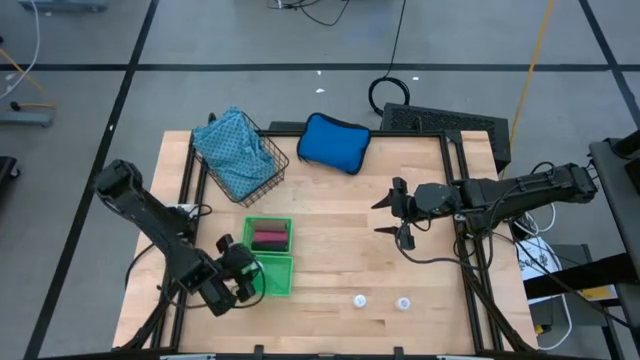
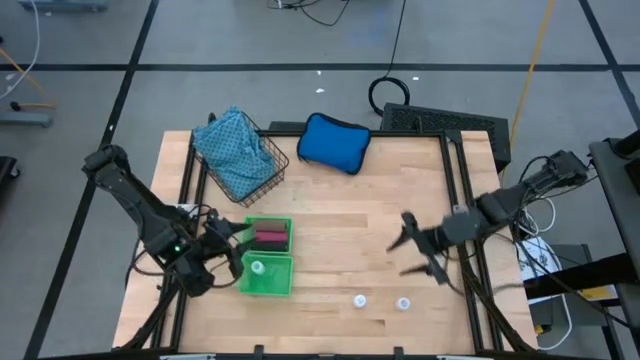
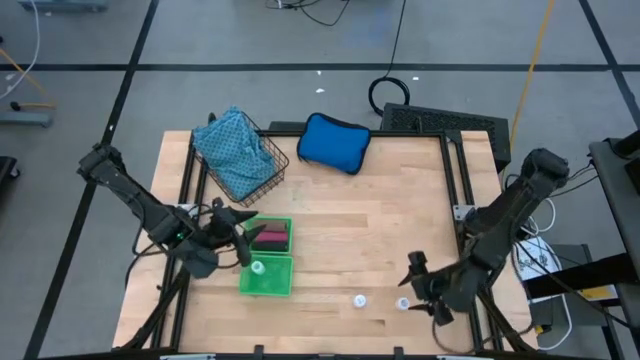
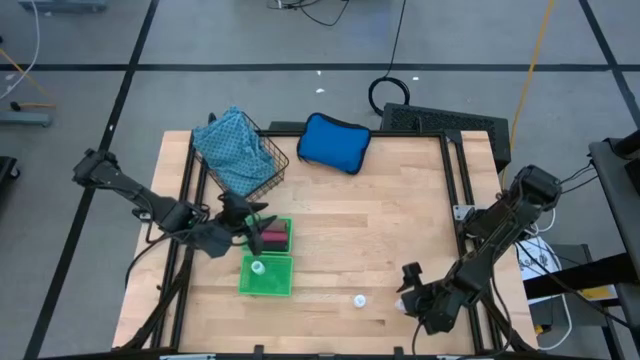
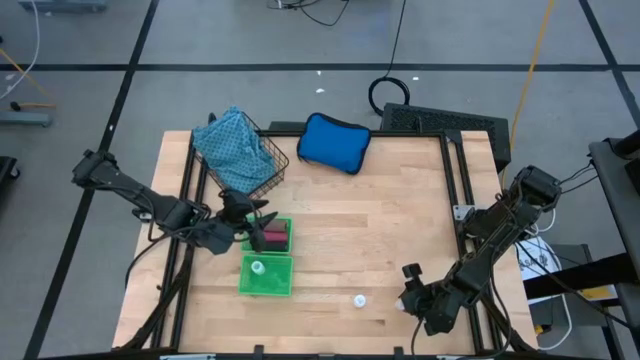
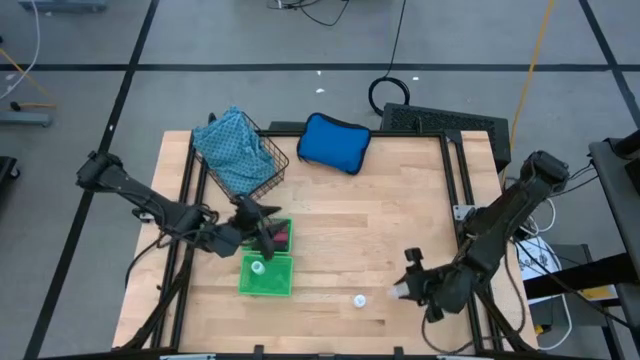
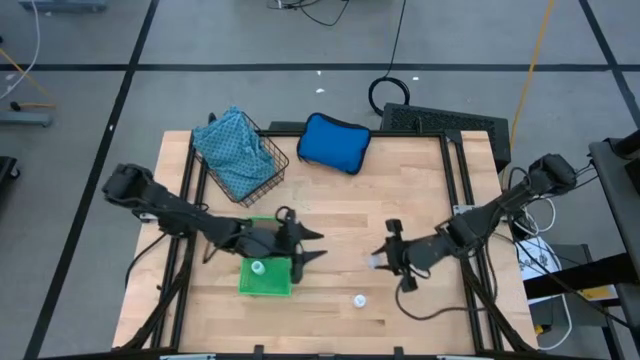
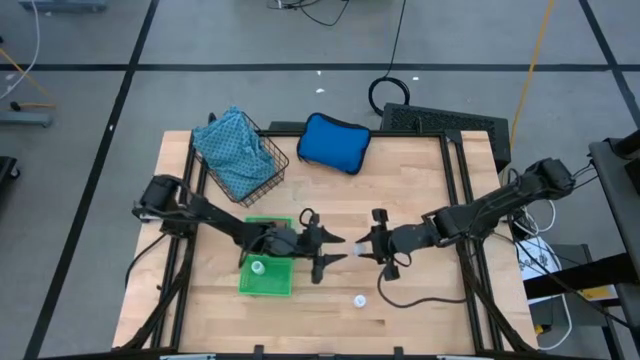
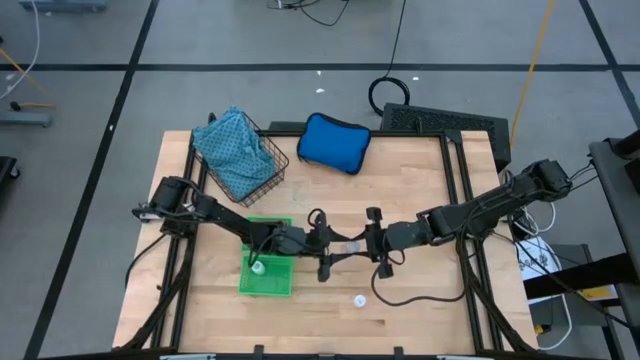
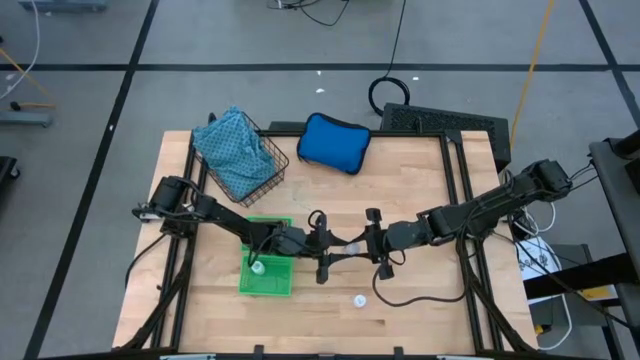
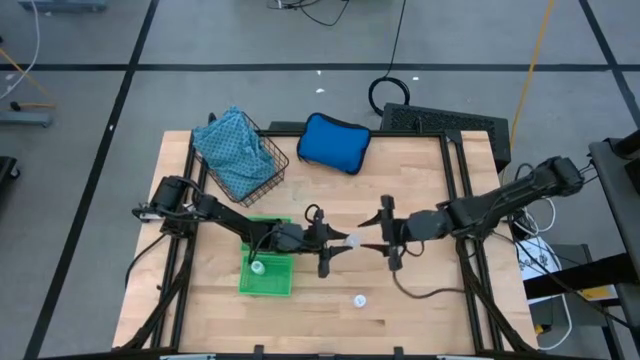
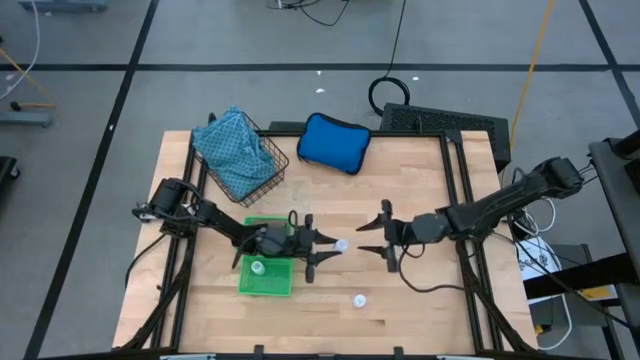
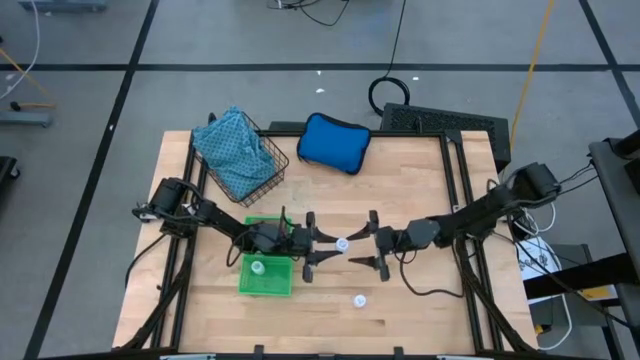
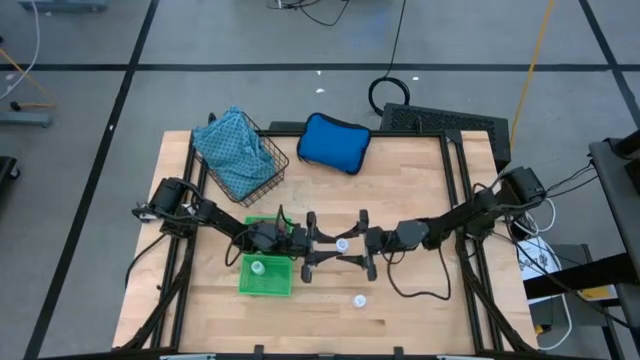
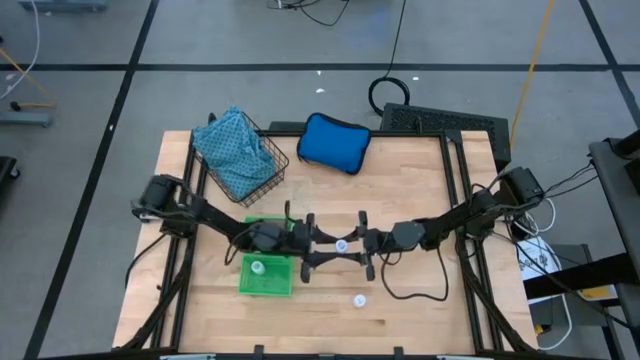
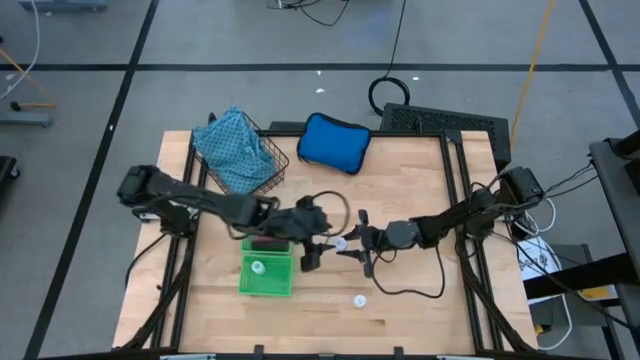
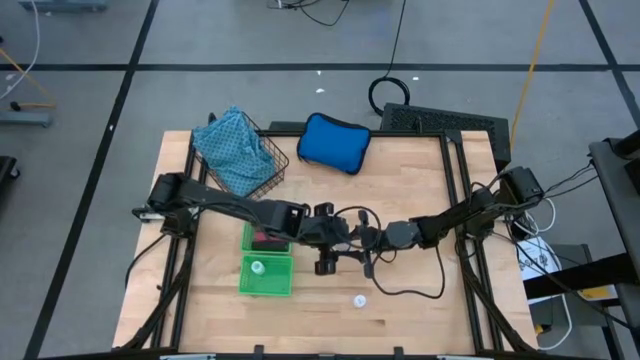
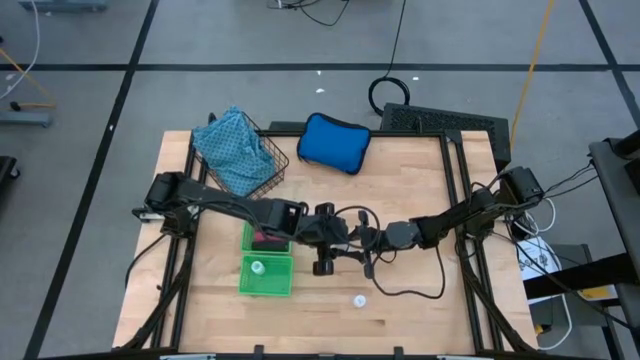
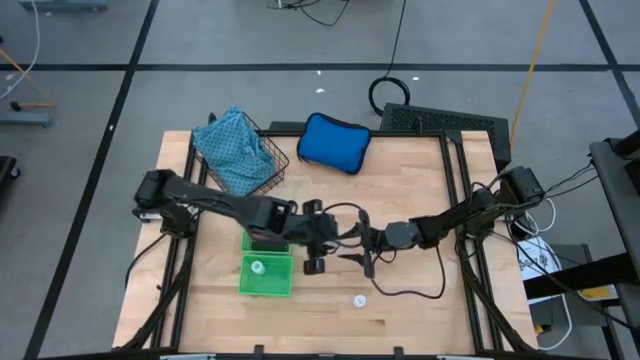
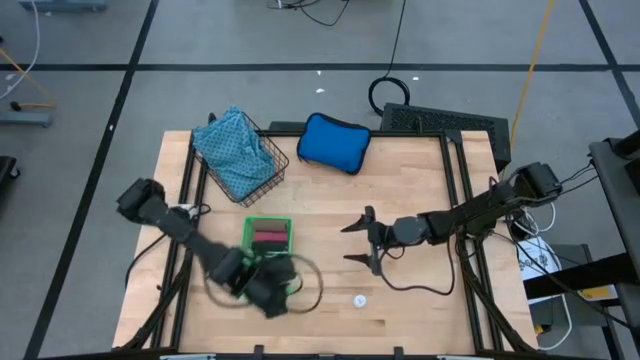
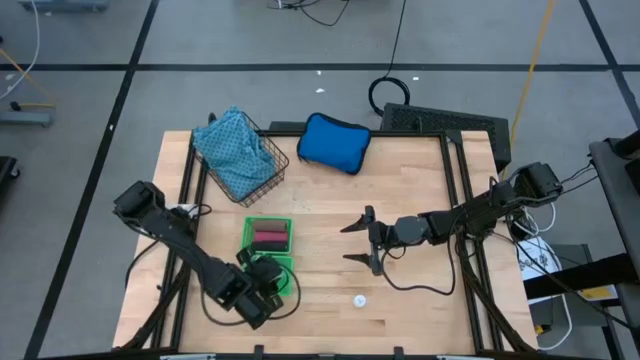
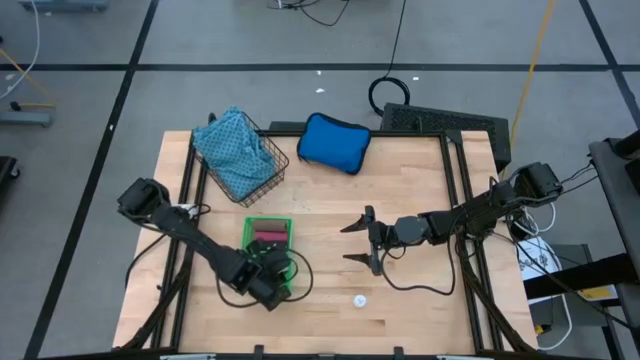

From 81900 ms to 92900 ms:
Task: Pick & Place Medicine items
Put the right white pill bottle into the bottom green basket

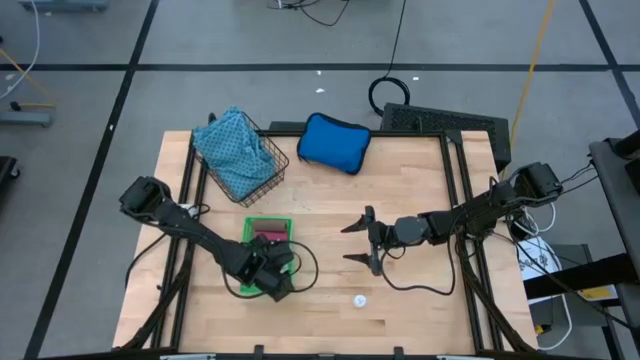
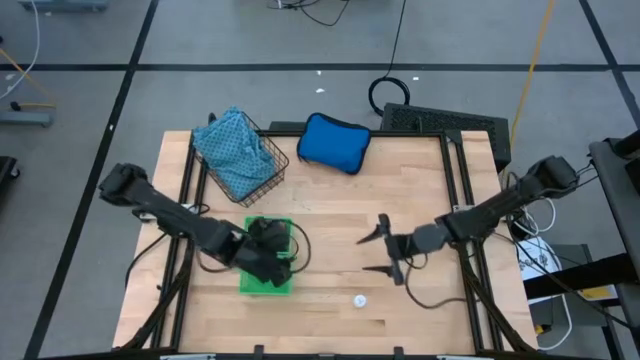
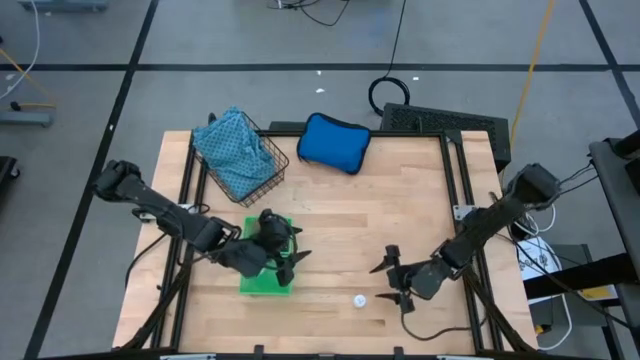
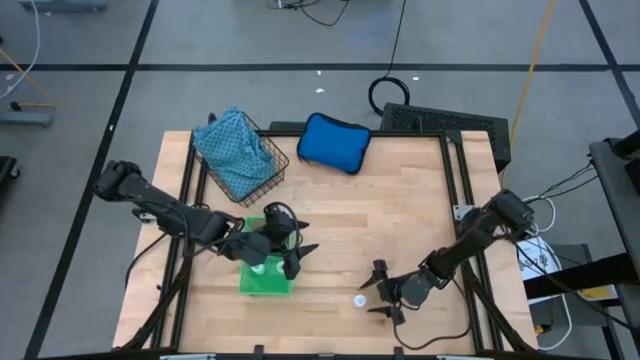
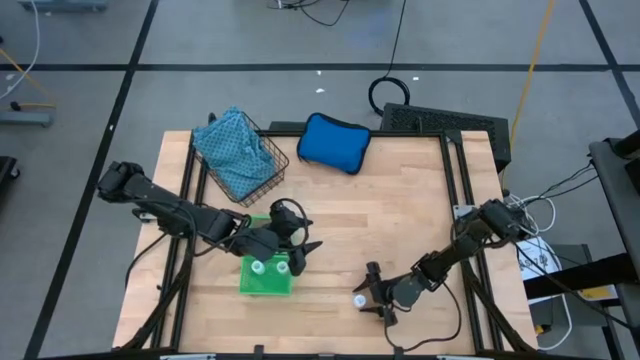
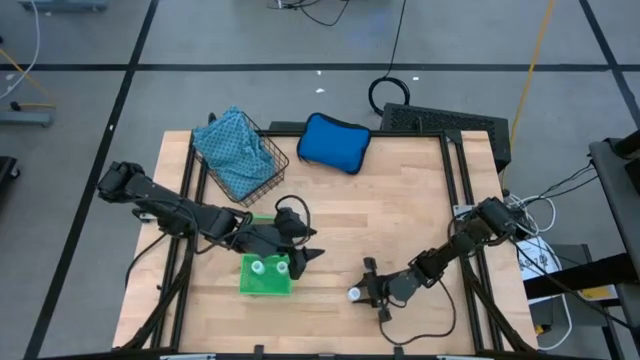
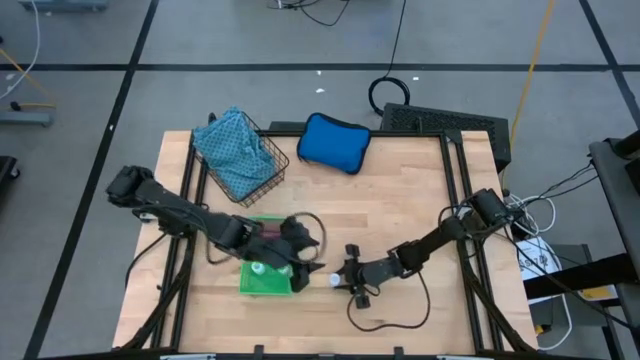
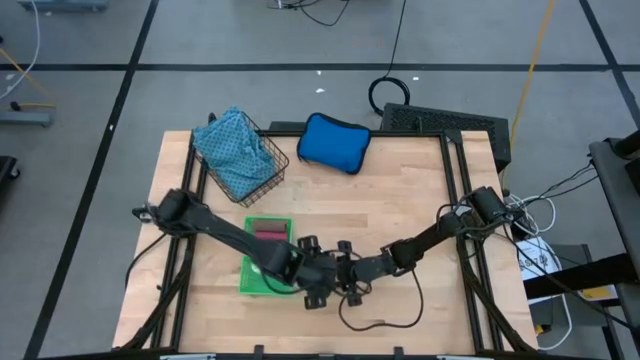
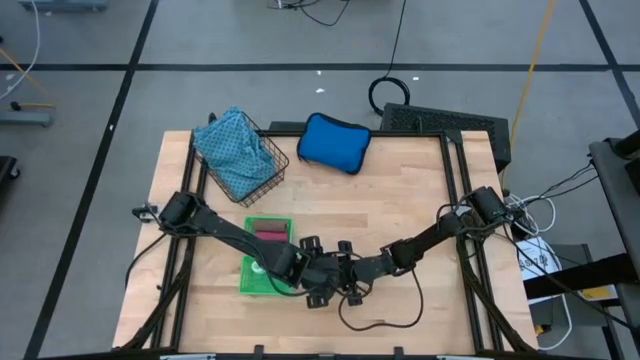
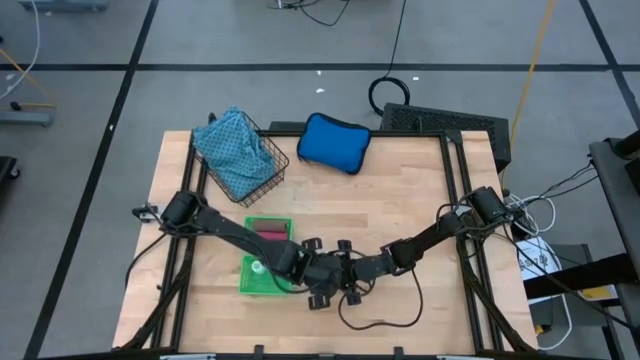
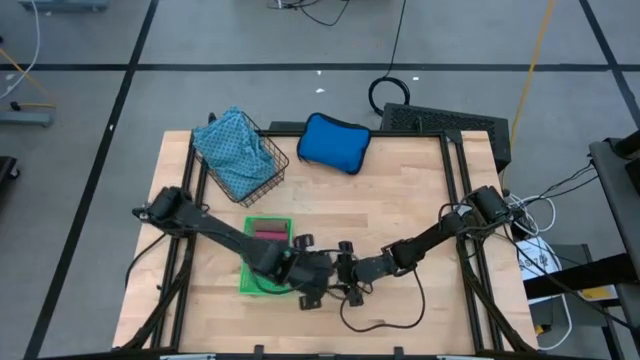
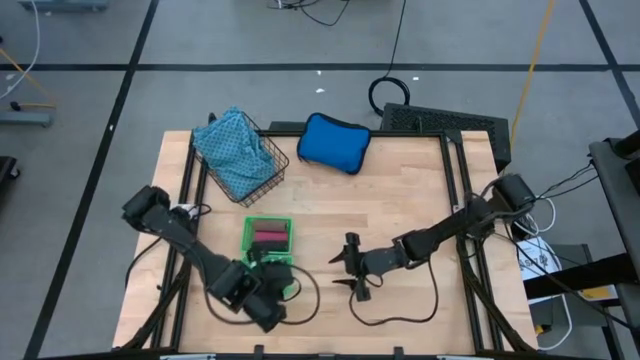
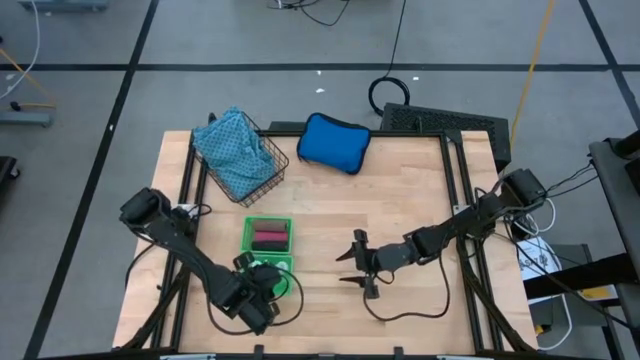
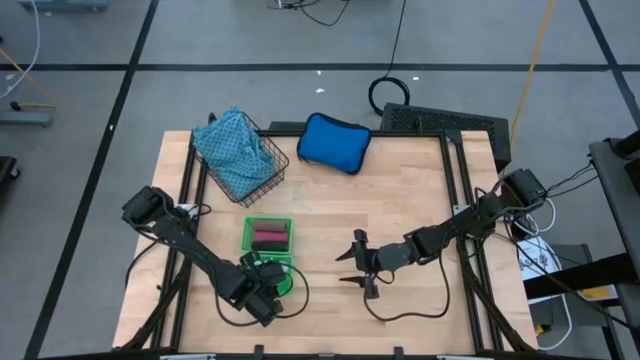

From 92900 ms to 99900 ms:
Put the white pill bottle into the bottom green basket
